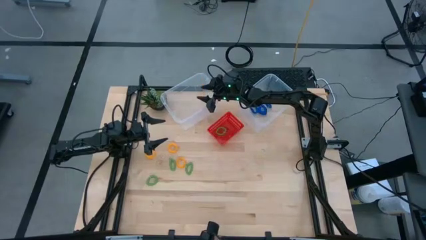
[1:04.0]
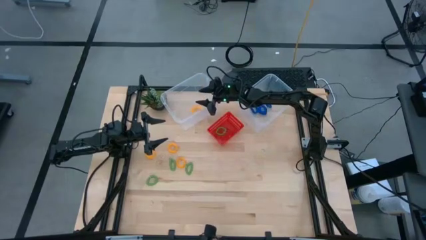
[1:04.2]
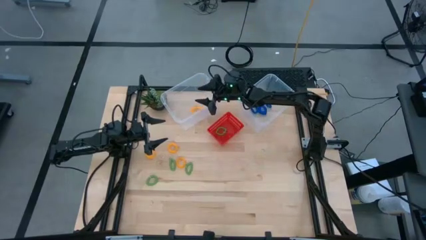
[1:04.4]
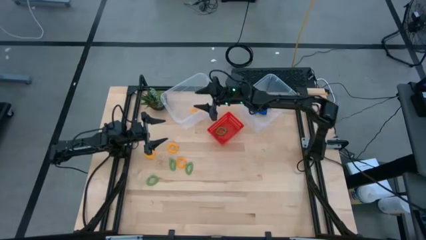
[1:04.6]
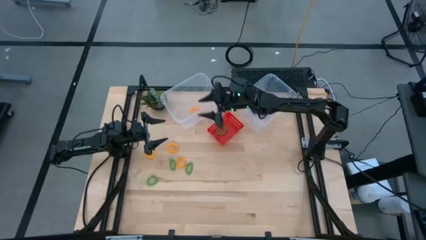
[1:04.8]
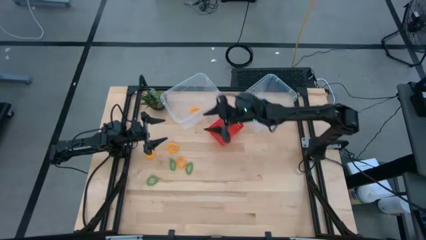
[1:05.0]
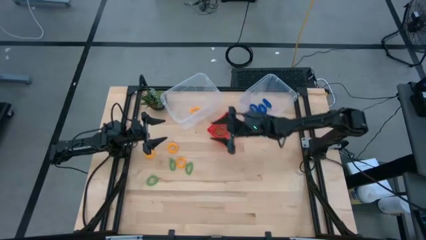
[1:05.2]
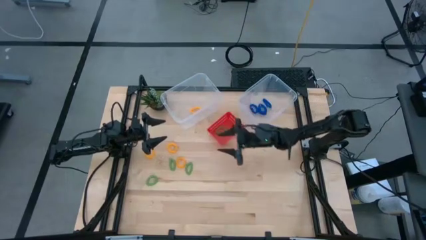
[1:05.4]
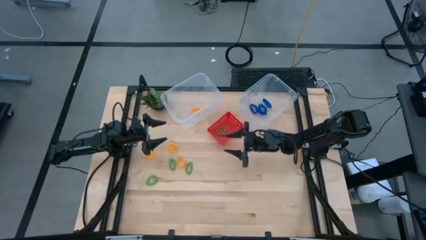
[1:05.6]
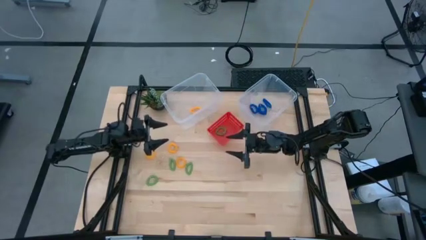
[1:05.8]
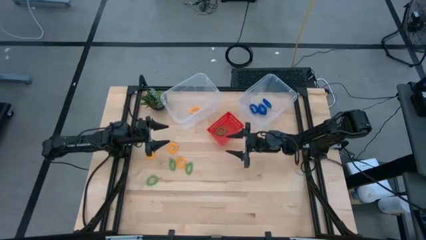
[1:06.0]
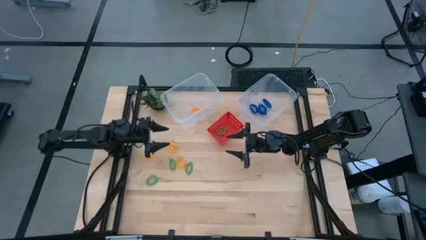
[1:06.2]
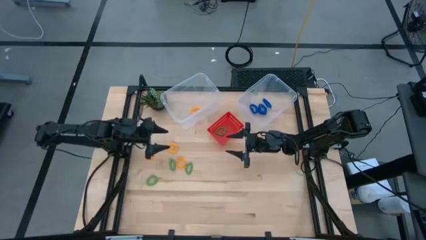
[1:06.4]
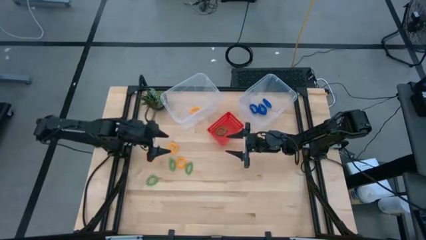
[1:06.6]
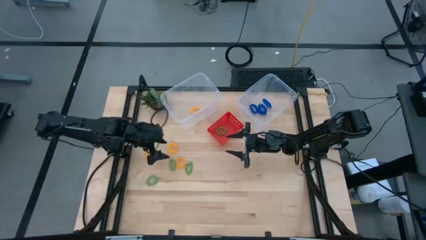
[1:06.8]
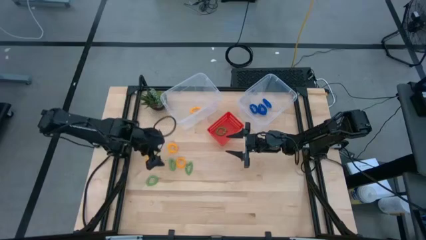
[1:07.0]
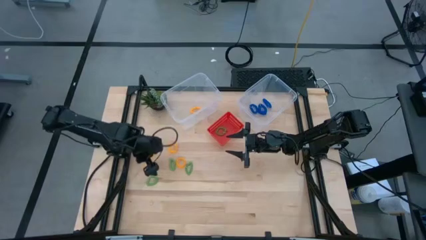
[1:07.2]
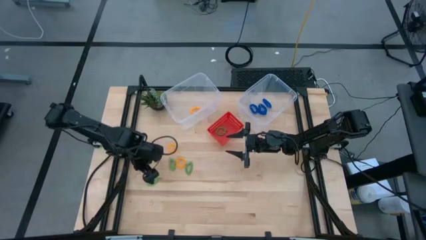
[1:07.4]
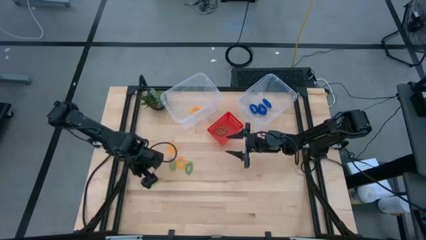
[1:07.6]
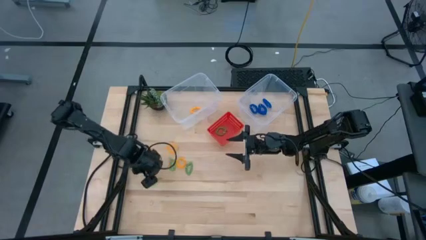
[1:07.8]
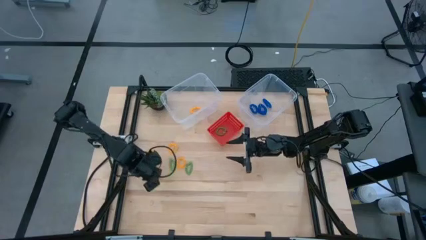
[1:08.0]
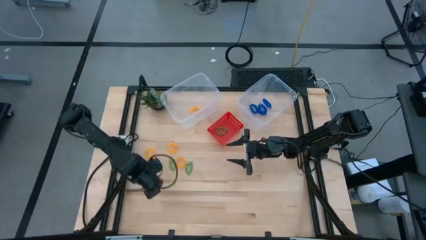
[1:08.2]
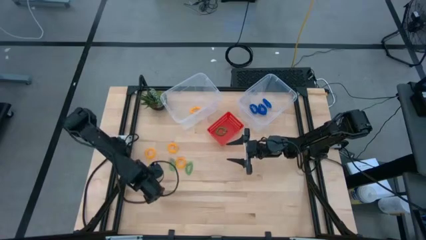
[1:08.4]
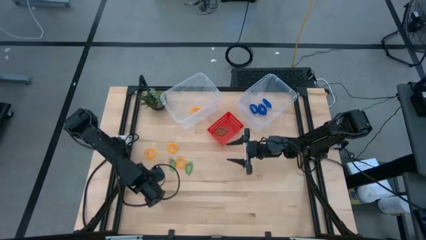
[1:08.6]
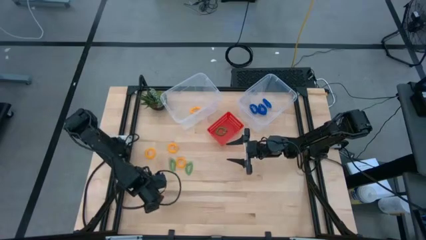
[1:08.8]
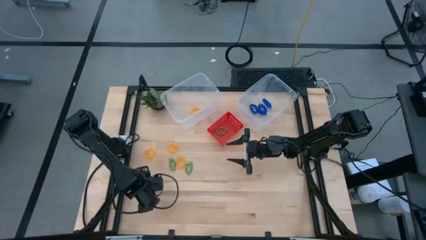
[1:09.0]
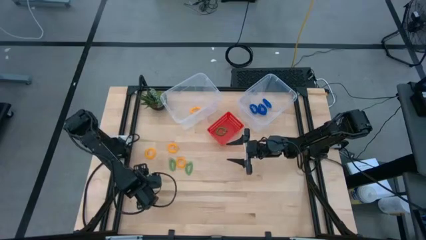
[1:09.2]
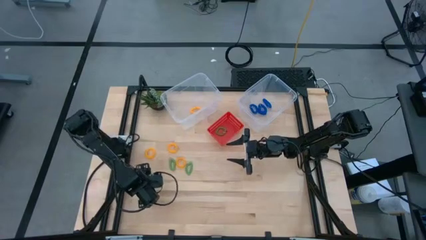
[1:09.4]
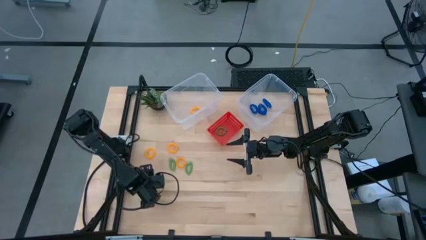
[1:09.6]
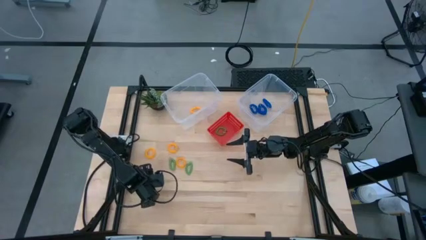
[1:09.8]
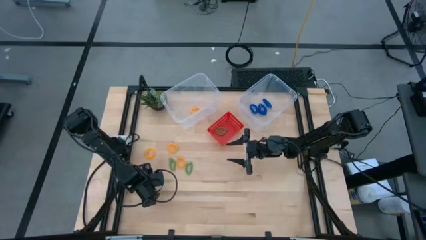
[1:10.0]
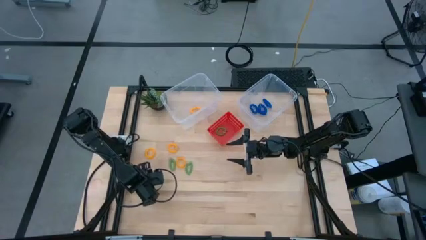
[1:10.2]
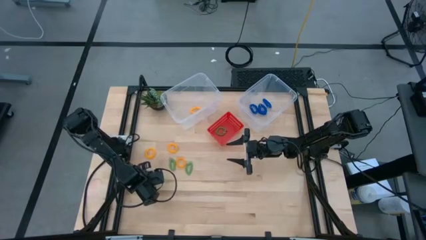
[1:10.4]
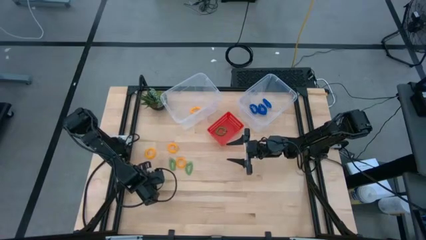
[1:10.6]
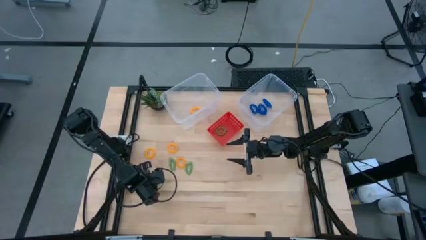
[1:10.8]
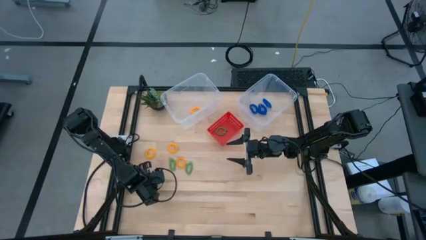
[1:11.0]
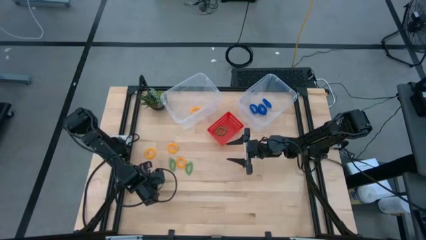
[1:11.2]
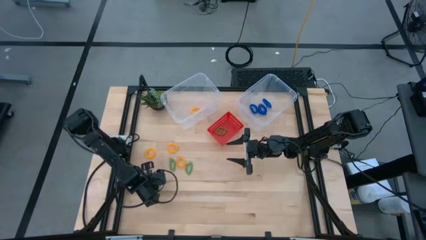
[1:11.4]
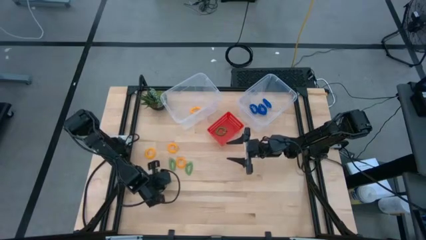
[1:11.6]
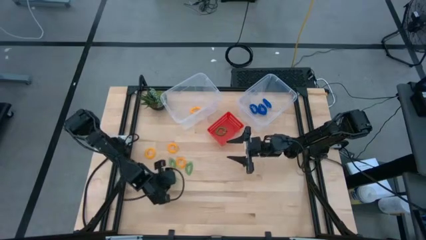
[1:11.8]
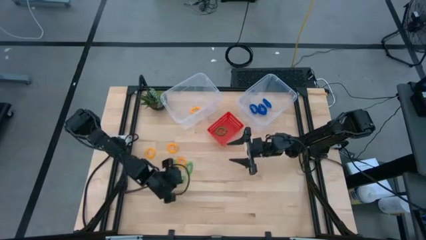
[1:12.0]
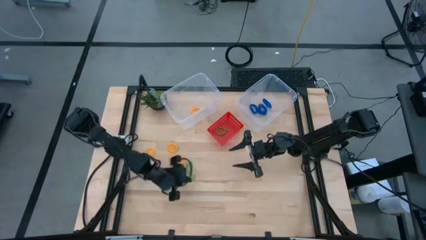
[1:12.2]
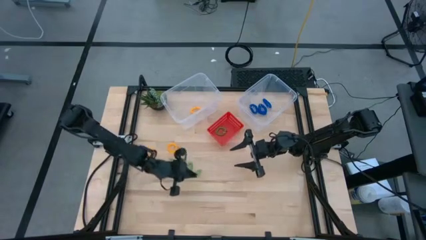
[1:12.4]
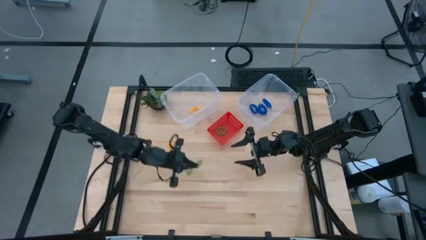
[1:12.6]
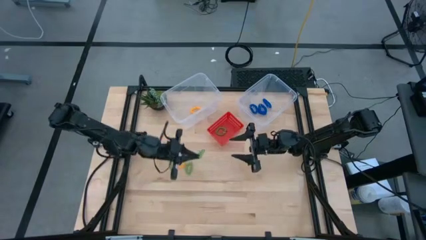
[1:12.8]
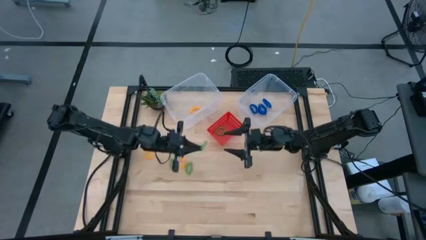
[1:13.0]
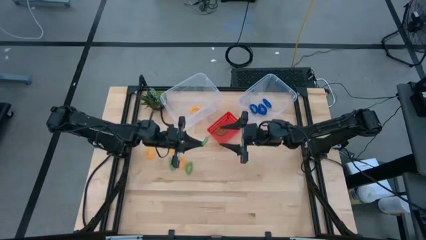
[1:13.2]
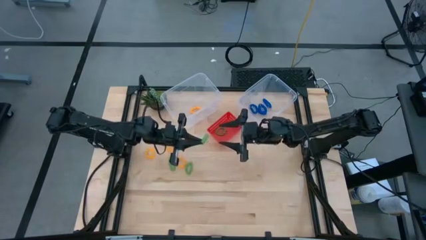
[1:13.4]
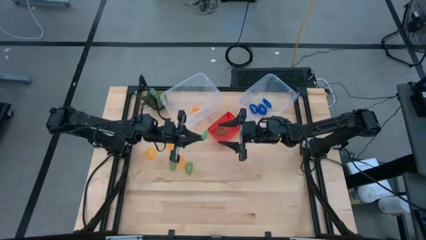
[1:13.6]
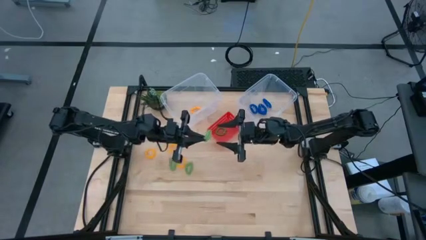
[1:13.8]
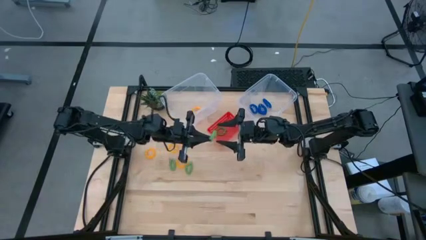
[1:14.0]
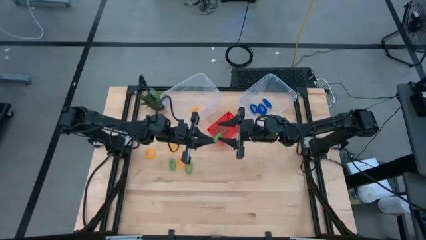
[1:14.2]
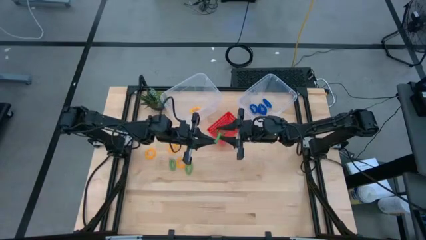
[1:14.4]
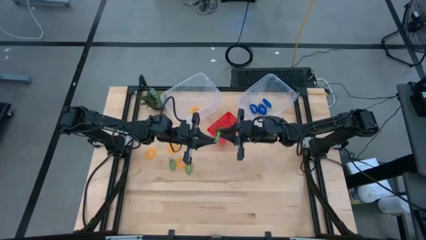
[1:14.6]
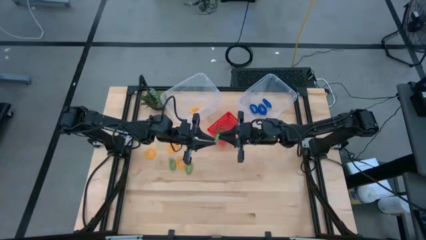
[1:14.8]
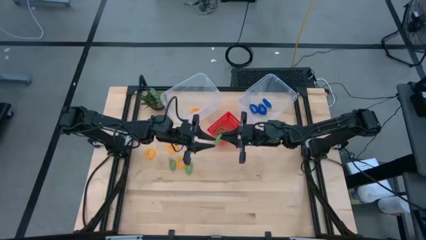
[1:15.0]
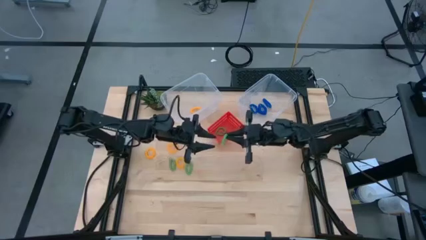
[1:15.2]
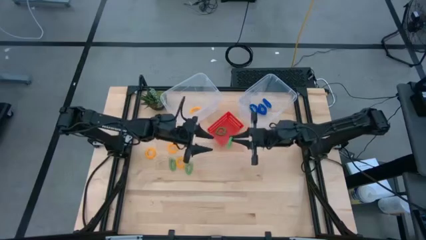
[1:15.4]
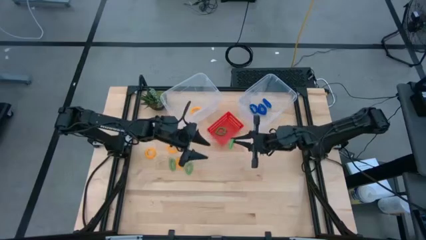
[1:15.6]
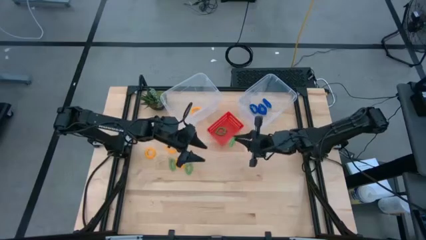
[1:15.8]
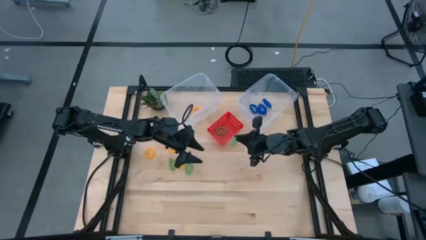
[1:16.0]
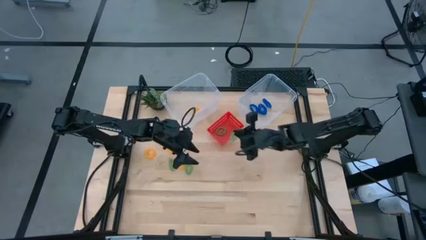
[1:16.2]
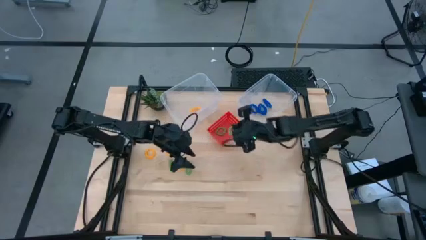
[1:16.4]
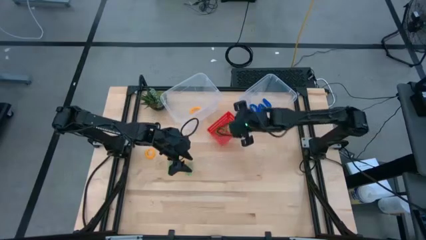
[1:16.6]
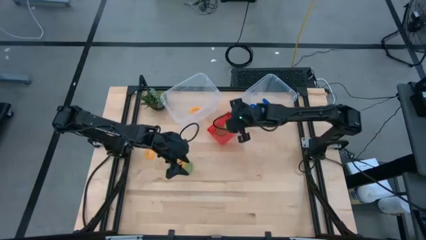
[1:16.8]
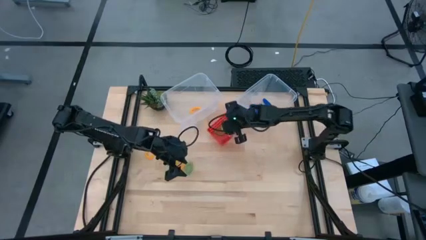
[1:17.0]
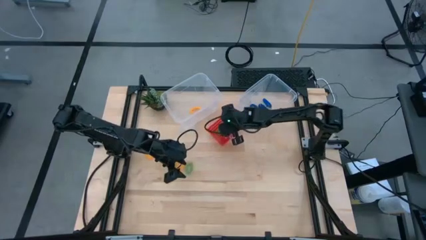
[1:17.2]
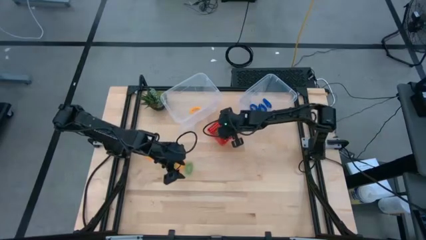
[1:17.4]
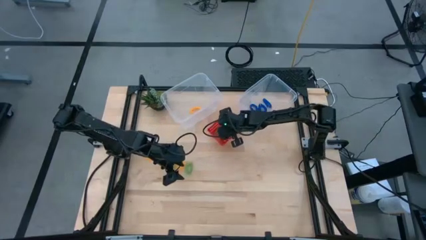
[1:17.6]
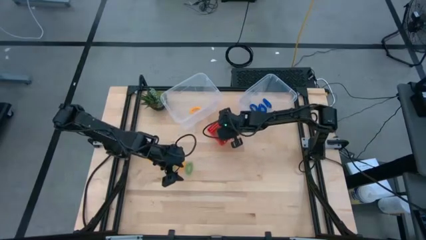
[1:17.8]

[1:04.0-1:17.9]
Task: Sort spring keychains
Put the green spring keychain into the red bin

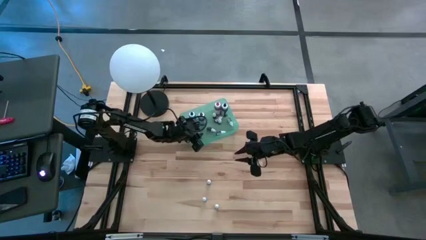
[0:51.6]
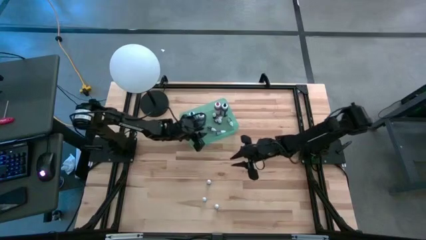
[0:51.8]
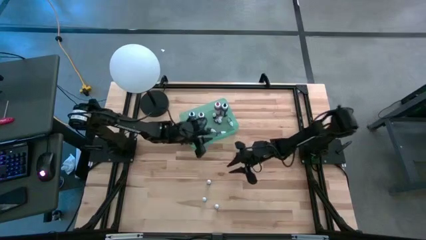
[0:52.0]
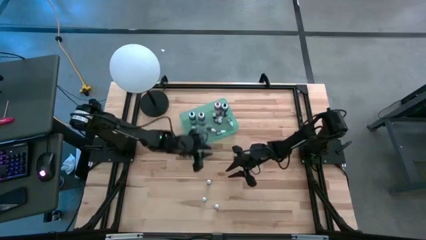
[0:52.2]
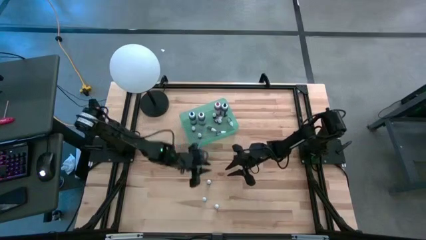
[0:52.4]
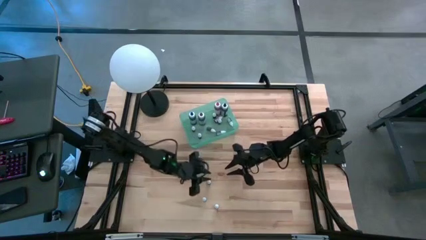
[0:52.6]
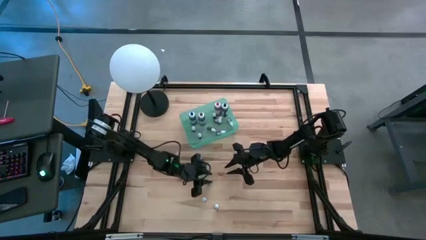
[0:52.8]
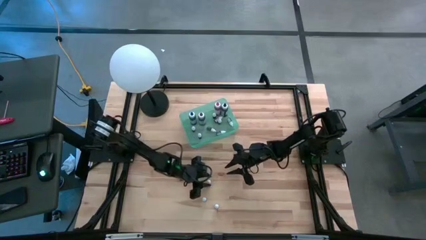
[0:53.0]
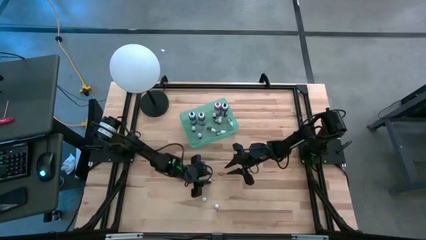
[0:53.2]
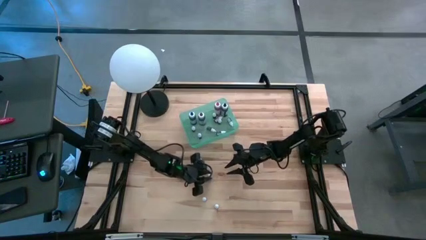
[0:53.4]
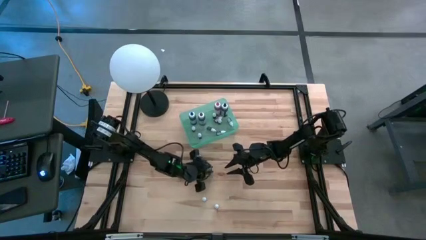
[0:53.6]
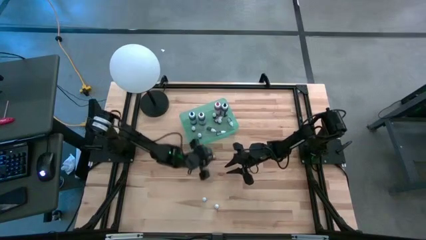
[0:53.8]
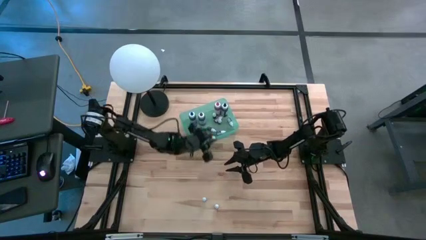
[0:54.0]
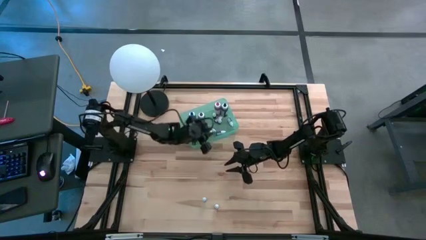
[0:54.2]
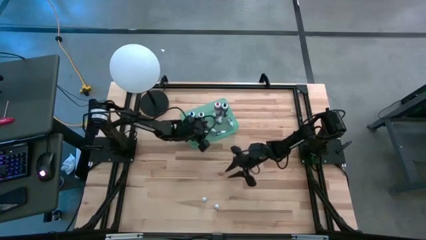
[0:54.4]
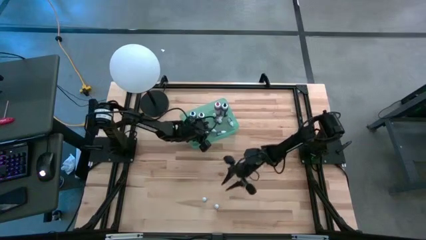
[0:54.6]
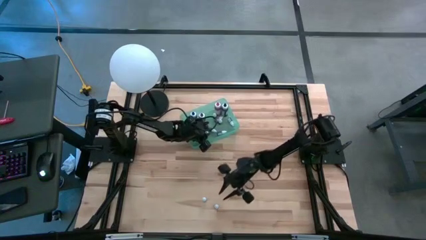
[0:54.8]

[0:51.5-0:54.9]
Task: Pick & Place food coloring
Put the small light green bottle into the blue bin

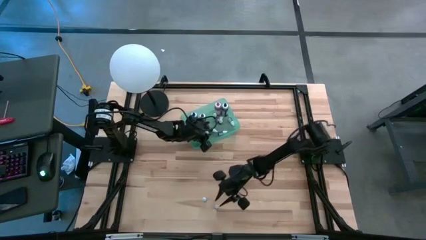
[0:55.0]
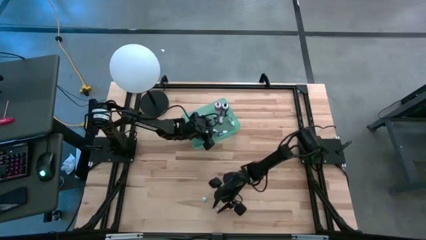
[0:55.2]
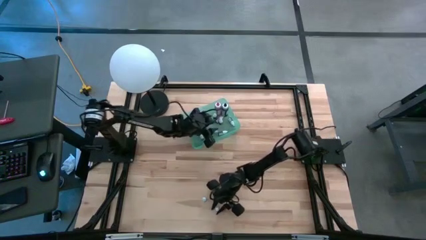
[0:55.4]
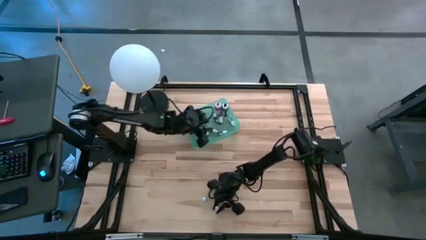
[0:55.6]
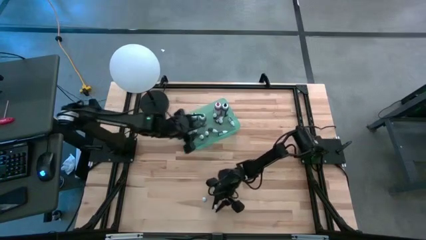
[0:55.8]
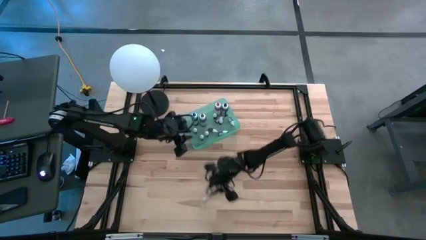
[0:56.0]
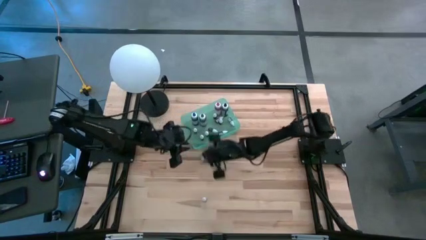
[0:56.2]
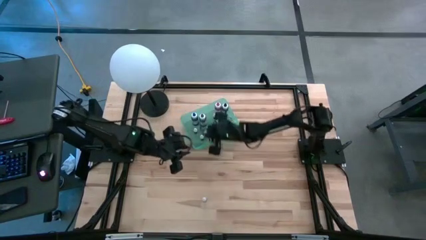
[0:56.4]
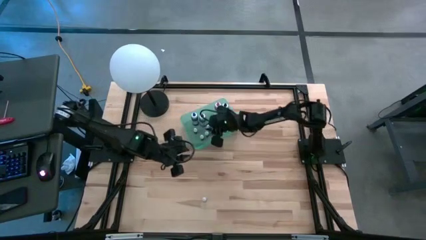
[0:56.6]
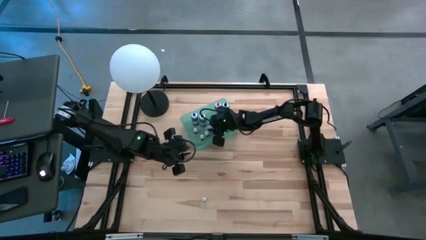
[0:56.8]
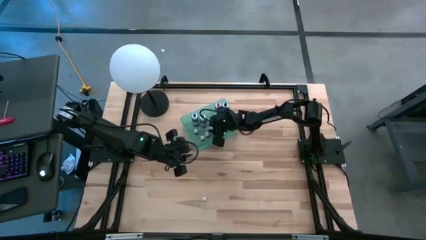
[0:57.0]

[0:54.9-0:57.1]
Put the small black bottle into the blue bin
